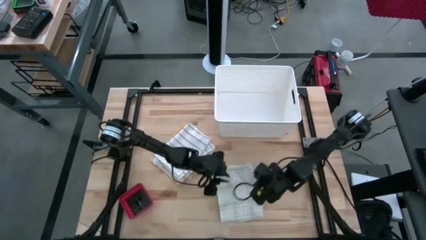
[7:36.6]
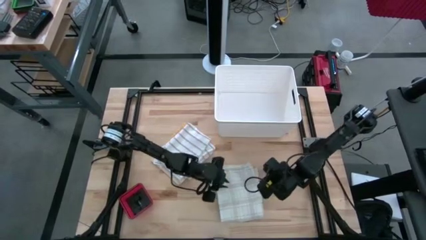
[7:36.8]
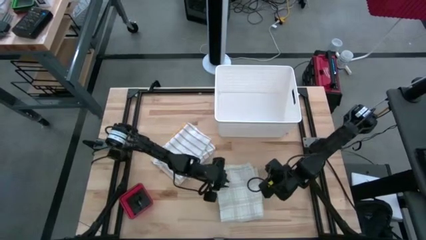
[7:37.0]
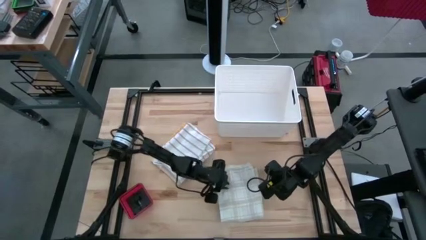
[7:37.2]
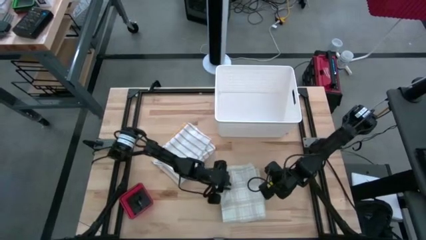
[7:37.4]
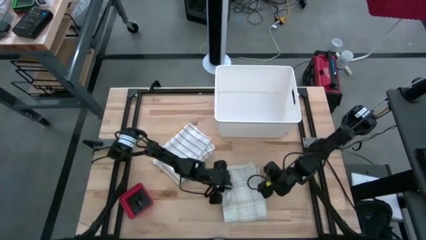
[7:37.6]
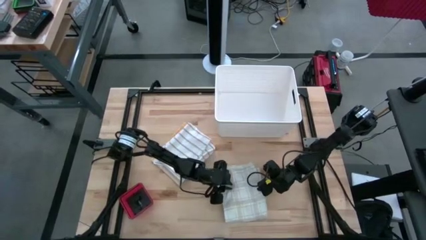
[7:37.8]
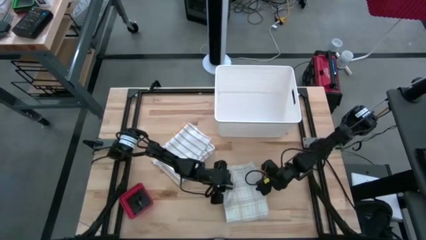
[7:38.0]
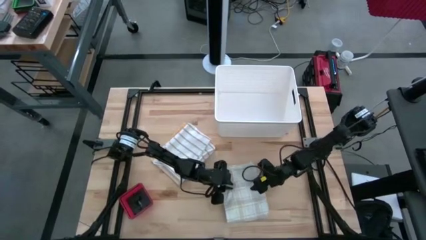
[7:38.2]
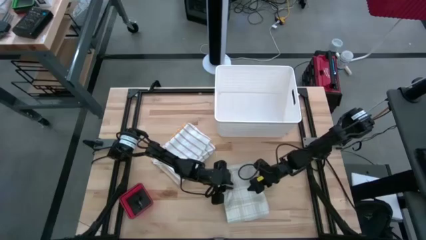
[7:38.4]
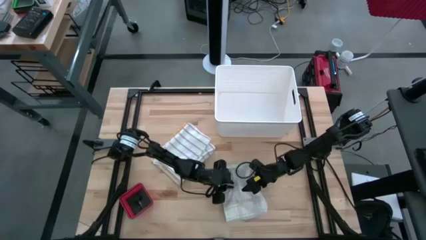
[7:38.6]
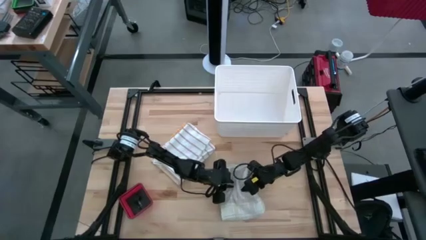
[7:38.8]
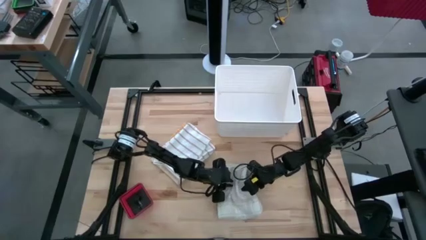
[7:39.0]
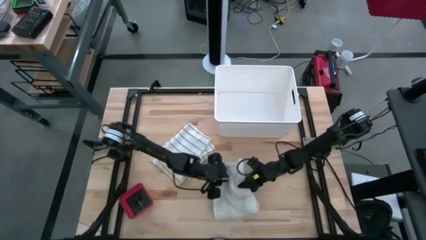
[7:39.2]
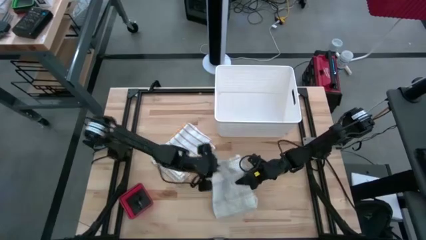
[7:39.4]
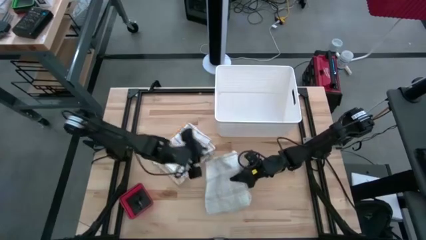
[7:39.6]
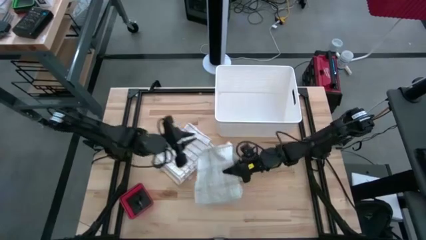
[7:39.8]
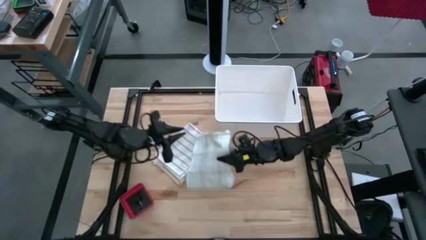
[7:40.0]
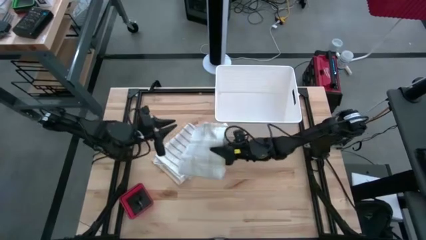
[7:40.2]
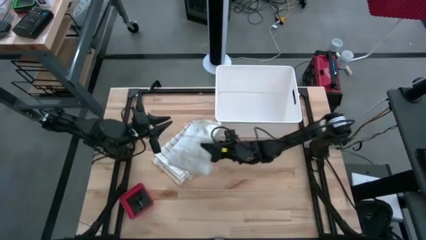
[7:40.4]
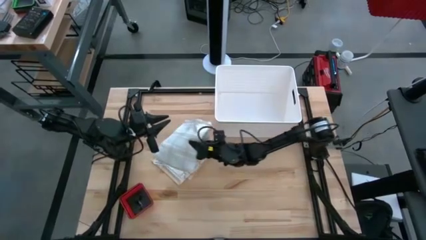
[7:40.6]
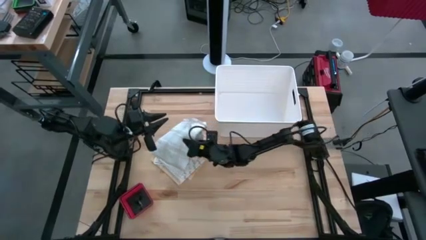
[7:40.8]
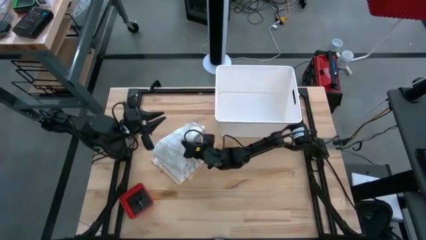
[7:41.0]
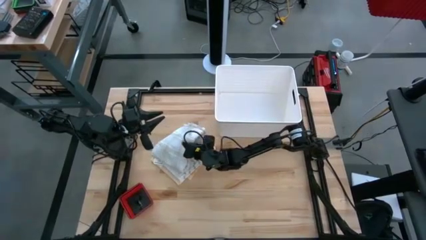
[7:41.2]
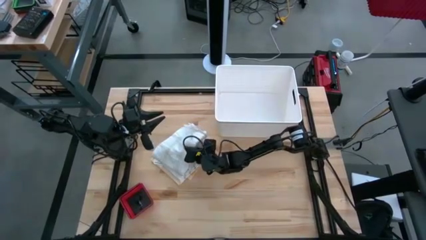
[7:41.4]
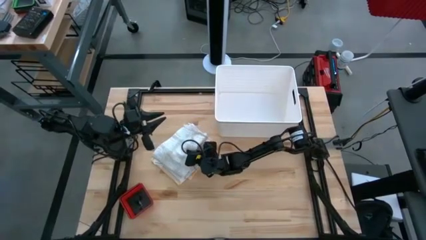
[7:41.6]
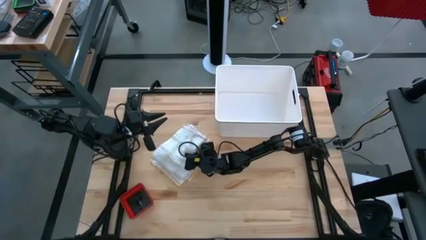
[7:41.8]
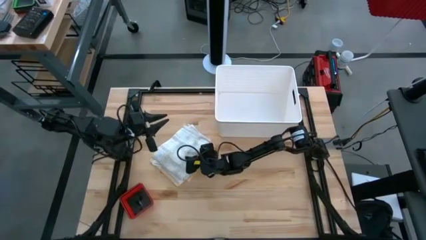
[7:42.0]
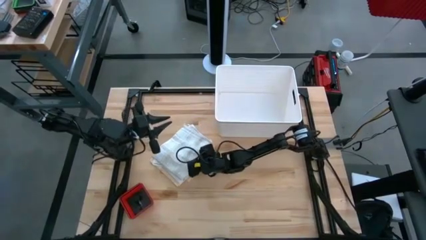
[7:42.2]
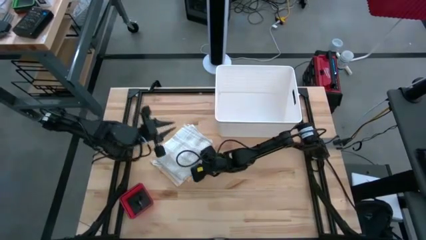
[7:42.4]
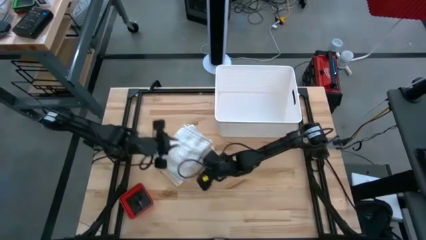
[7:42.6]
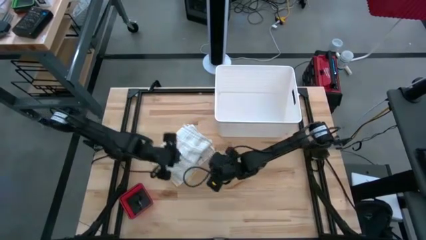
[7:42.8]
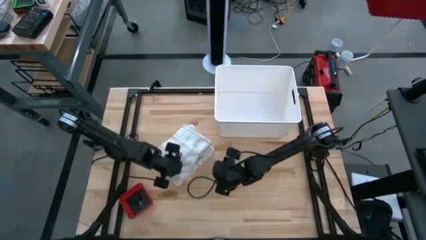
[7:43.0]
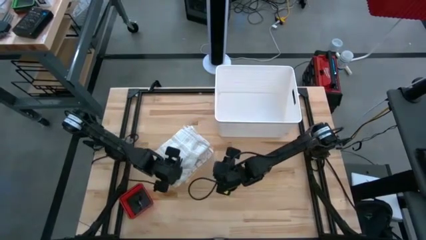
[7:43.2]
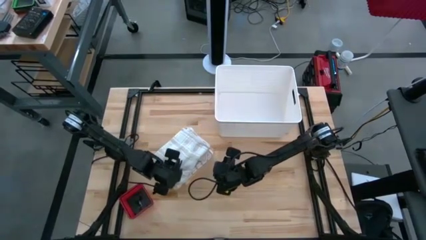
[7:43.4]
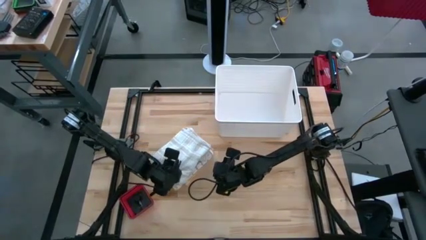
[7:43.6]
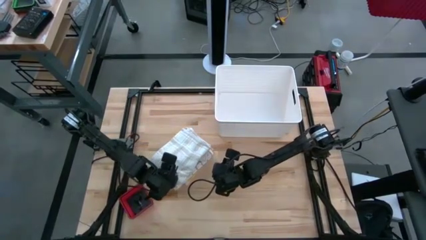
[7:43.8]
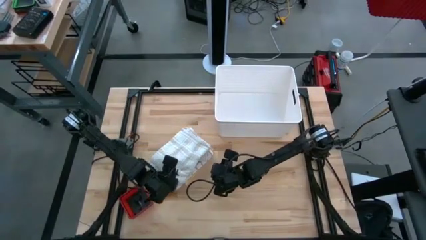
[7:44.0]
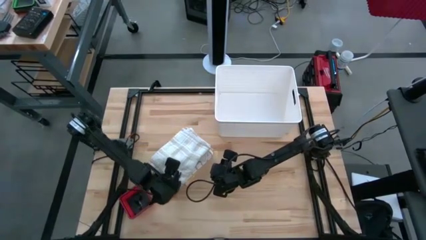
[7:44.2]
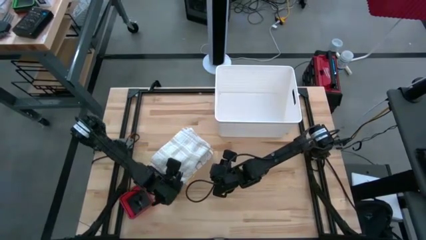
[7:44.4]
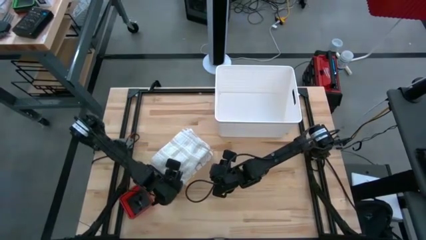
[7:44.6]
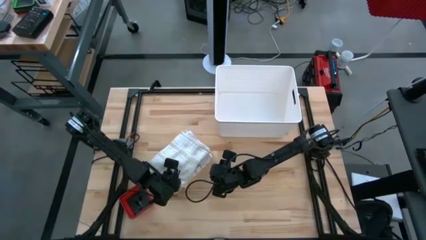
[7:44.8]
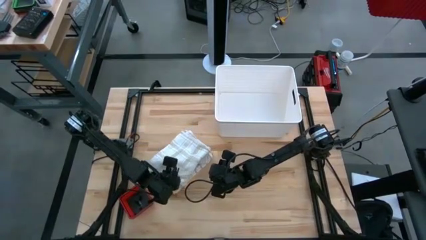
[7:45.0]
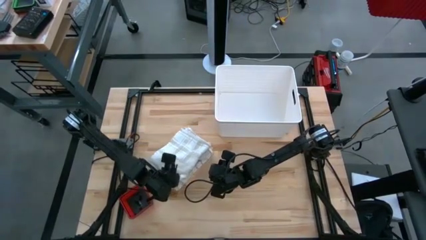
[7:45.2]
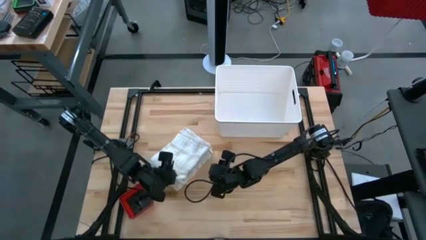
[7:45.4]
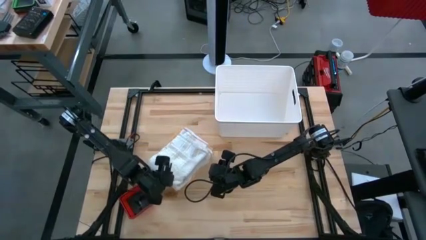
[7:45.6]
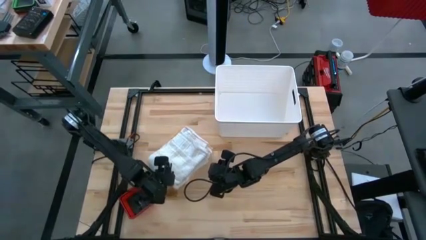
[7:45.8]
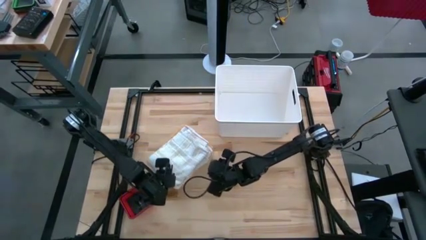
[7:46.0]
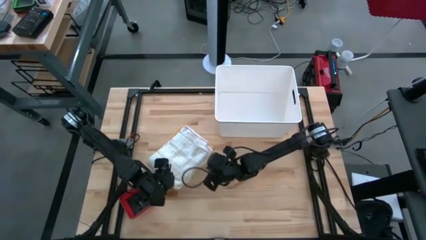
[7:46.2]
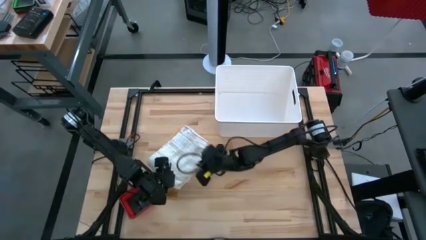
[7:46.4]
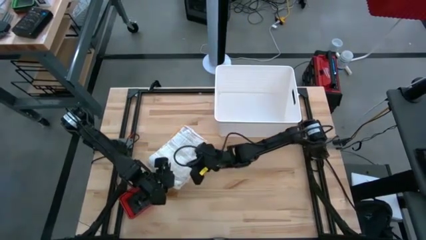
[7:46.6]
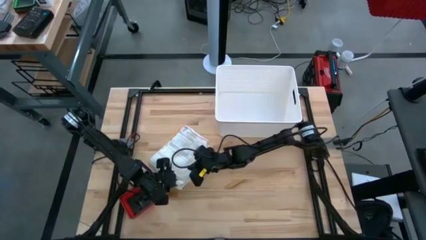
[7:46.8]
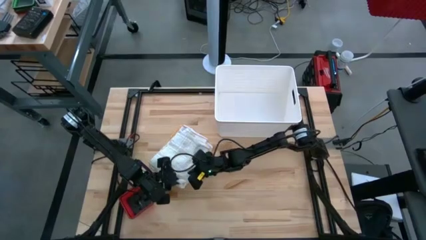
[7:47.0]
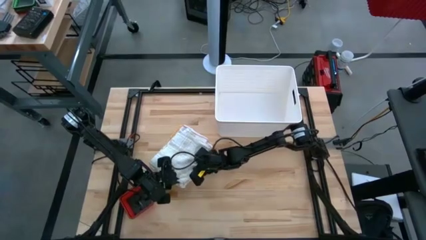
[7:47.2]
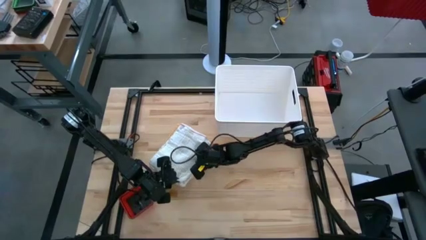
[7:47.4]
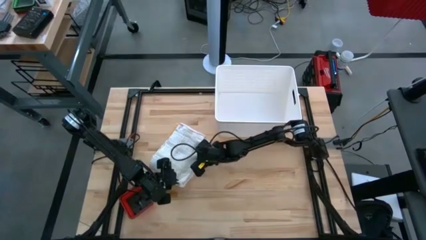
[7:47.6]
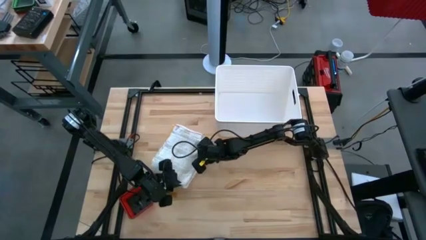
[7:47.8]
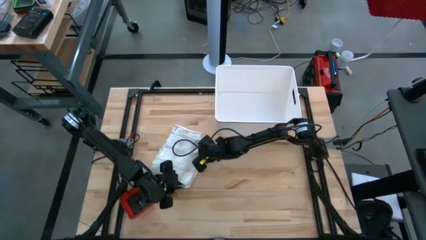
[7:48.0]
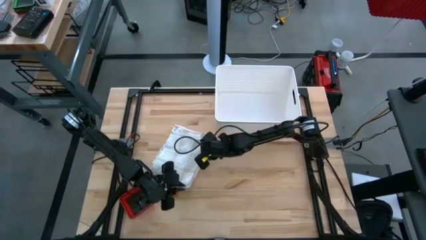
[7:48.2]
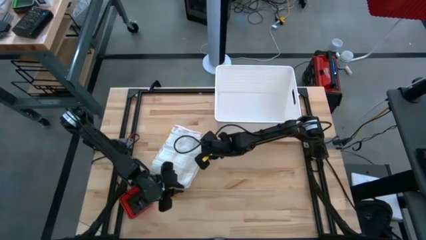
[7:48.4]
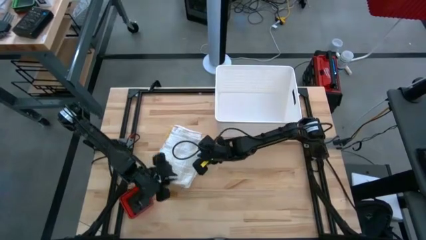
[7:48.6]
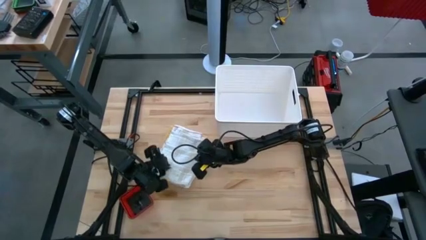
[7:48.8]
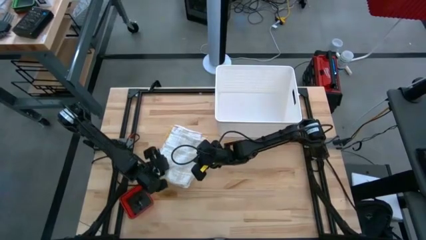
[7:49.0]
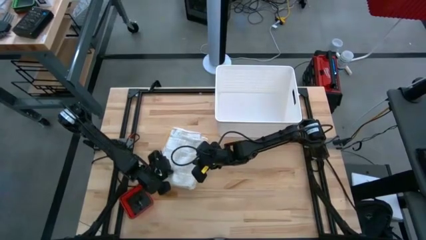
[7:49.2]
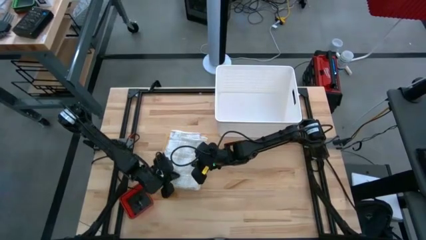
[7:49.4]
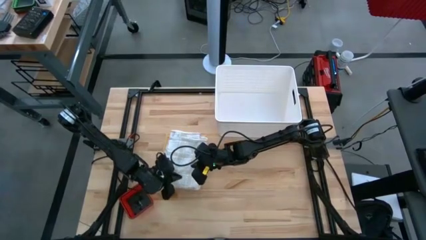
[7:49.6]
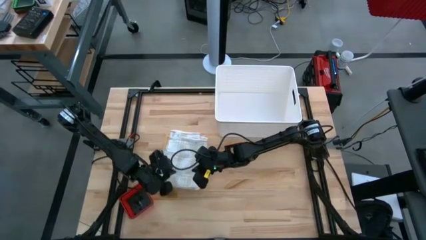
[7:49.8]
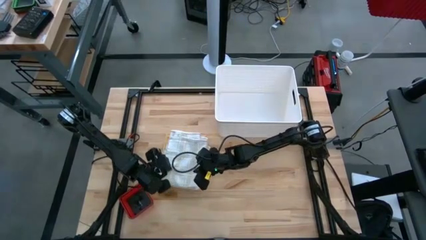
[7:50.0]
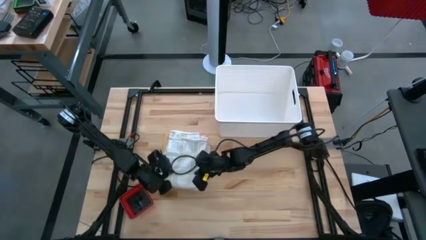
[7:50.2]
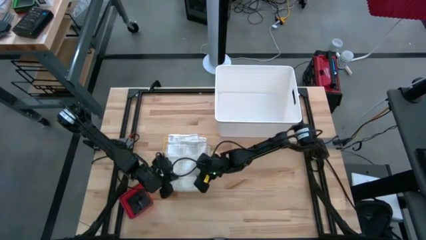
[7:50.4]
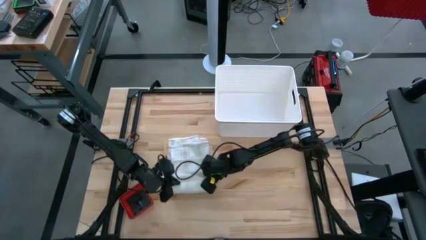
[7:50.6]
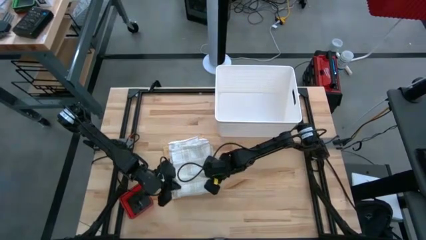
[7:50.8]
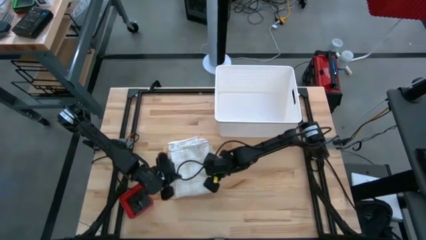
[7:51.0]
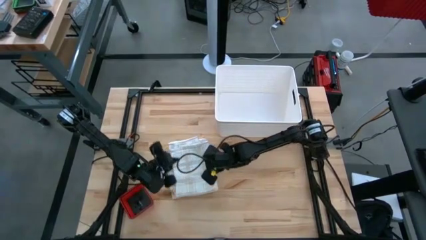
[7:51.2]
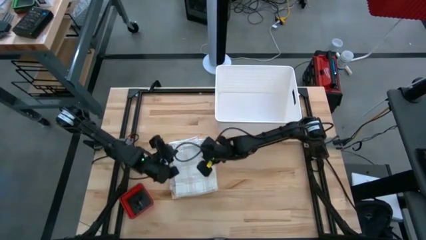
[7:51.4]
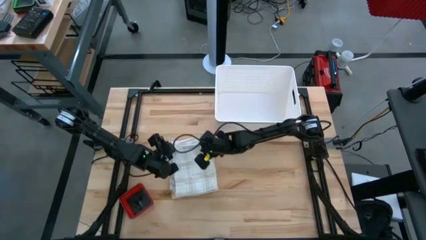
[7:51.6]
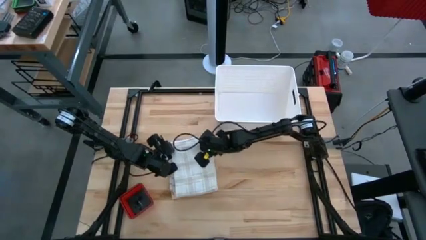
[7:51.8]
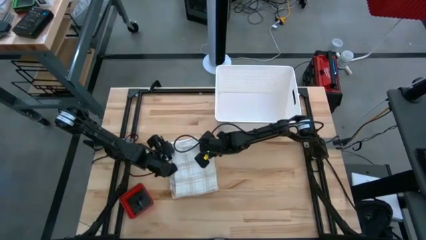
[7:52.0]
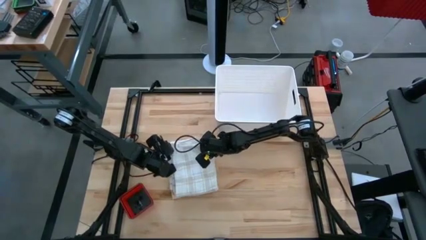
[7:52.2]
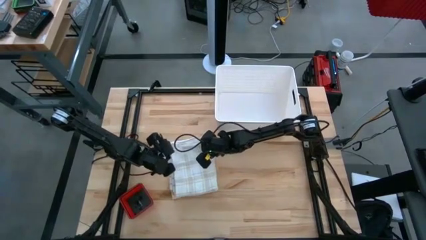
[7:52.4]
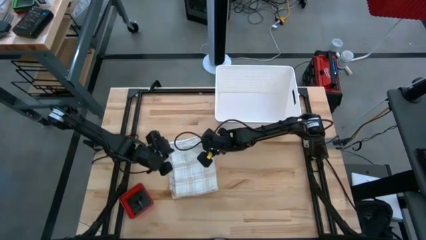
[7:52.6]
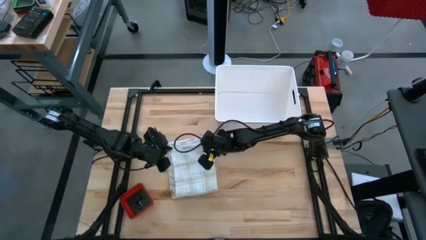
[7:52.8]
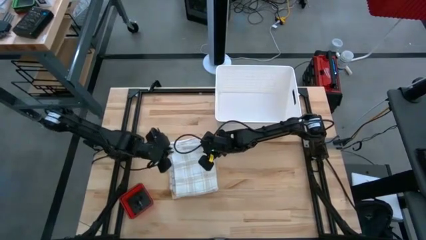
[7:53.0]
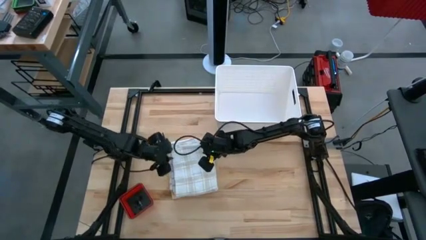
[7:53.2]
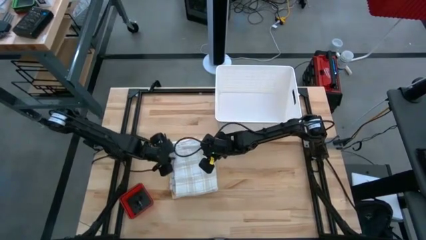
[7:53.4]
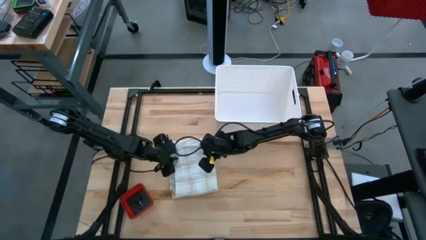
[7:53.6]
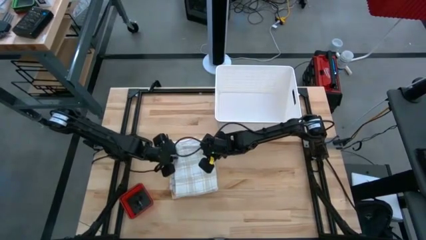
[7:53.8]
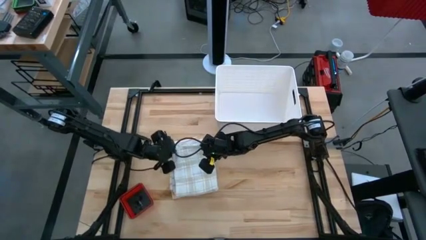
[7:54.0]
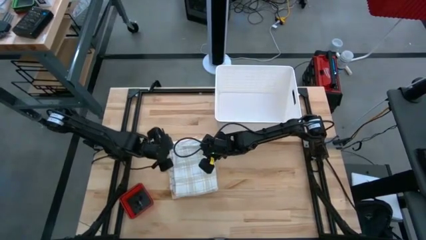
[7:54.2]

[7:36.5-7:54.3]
Task: Fold towel
Stack the light gray patterned towel on top of the brown patterned towel
